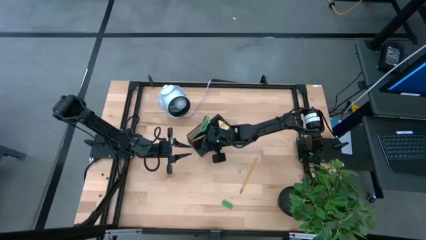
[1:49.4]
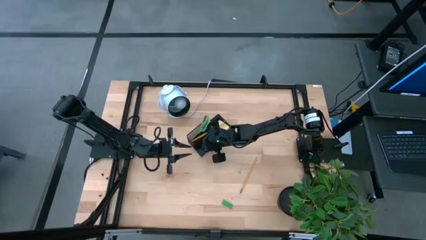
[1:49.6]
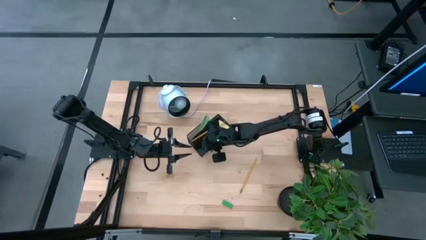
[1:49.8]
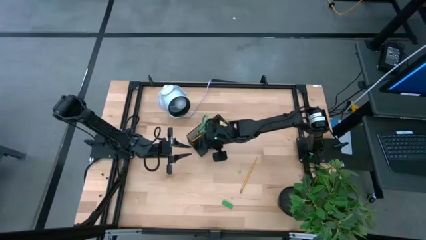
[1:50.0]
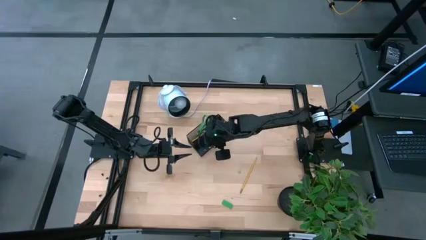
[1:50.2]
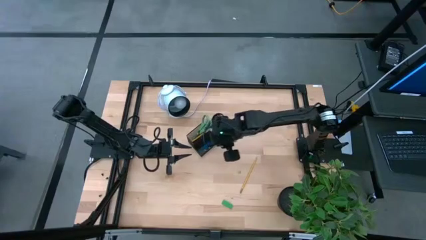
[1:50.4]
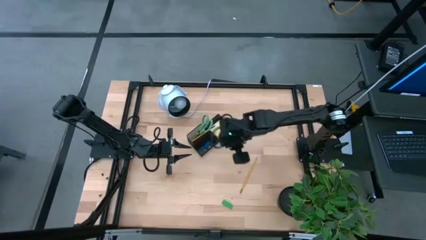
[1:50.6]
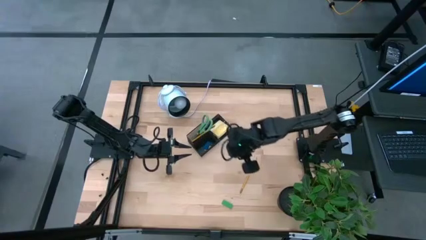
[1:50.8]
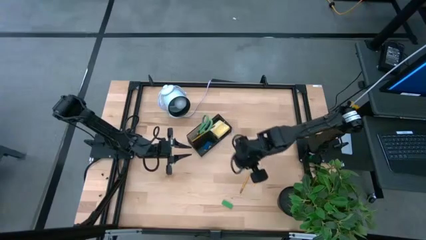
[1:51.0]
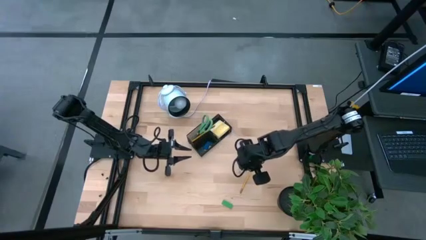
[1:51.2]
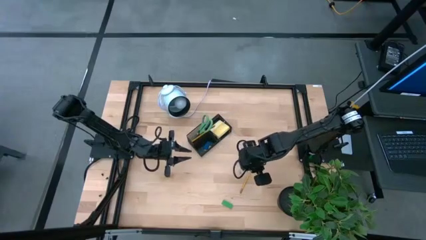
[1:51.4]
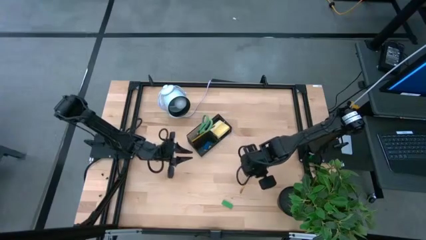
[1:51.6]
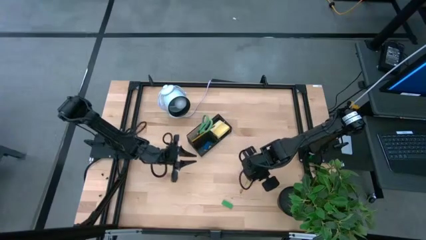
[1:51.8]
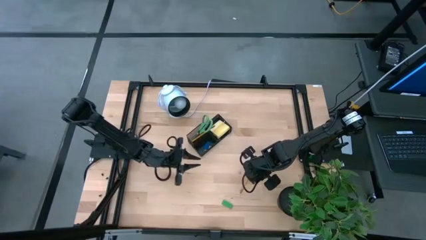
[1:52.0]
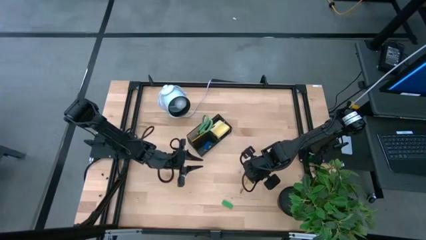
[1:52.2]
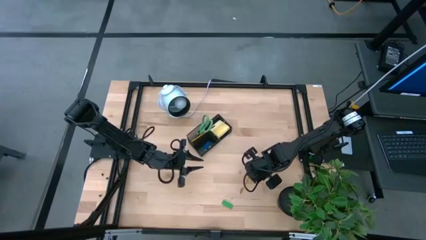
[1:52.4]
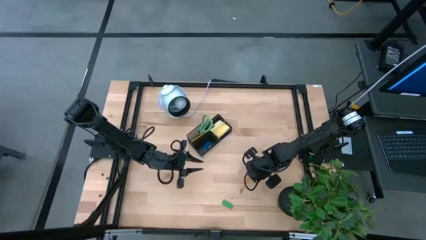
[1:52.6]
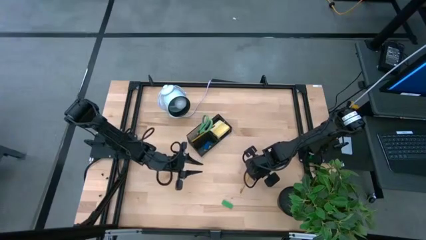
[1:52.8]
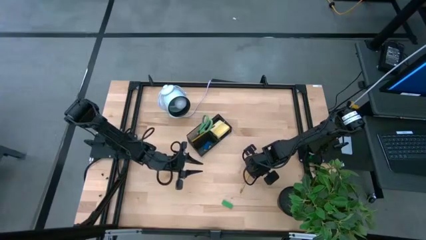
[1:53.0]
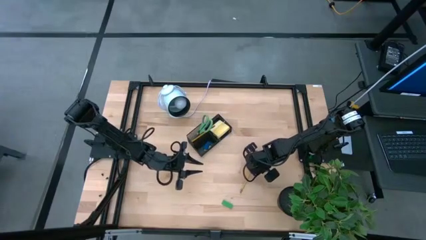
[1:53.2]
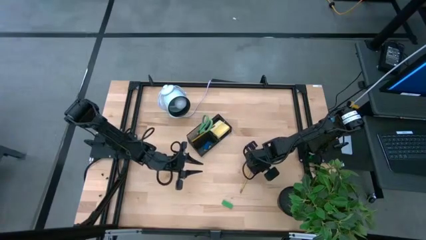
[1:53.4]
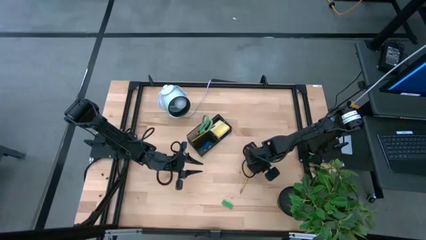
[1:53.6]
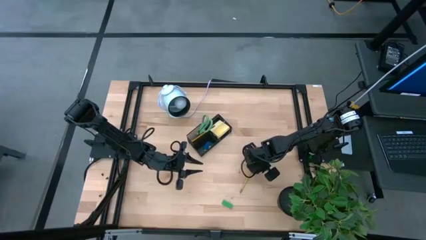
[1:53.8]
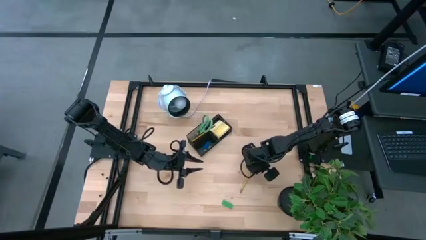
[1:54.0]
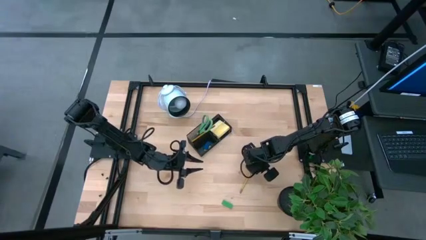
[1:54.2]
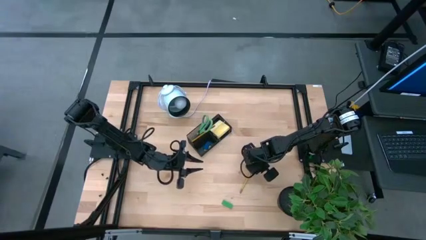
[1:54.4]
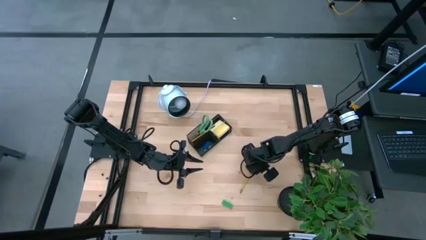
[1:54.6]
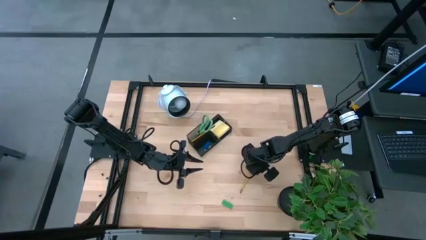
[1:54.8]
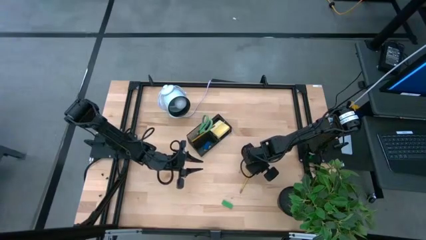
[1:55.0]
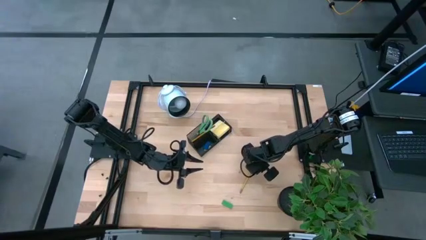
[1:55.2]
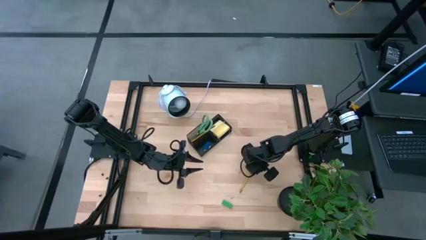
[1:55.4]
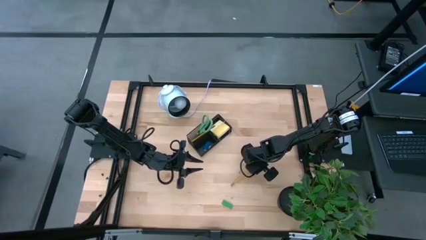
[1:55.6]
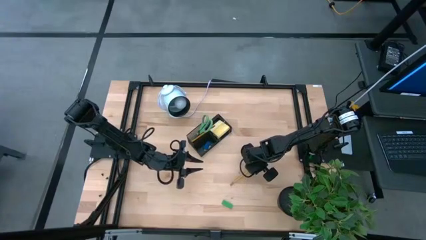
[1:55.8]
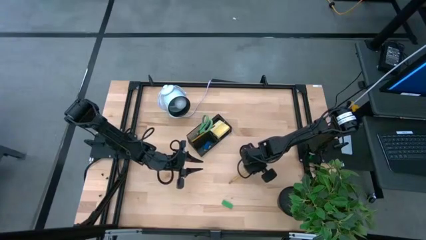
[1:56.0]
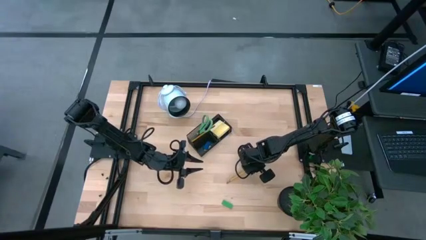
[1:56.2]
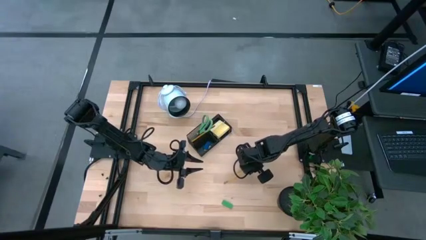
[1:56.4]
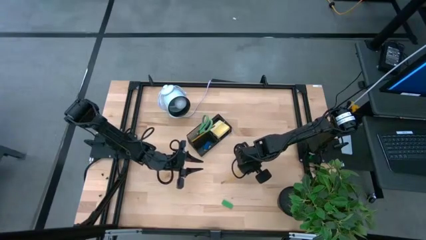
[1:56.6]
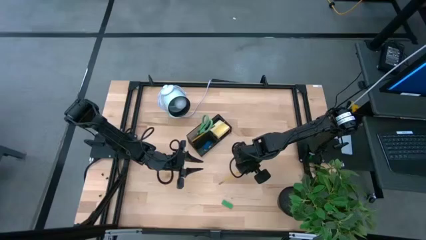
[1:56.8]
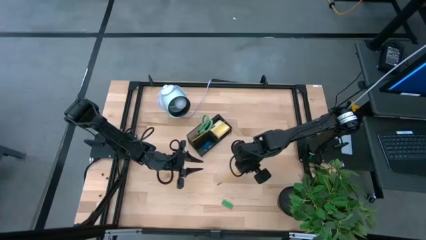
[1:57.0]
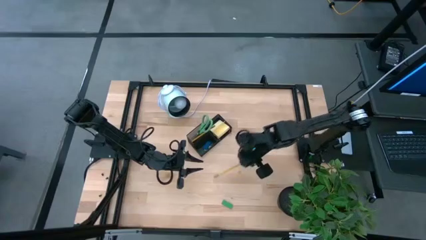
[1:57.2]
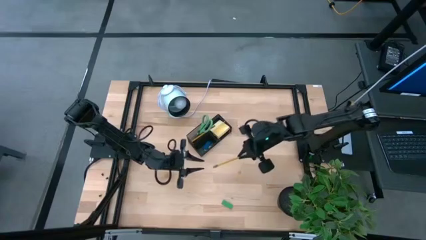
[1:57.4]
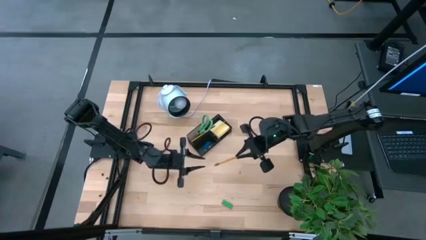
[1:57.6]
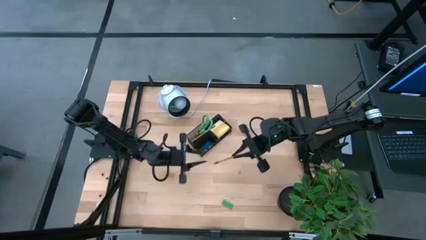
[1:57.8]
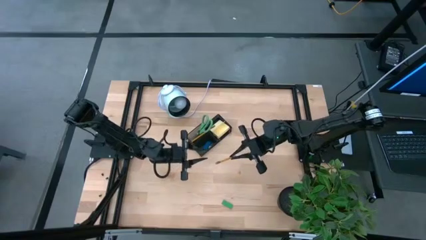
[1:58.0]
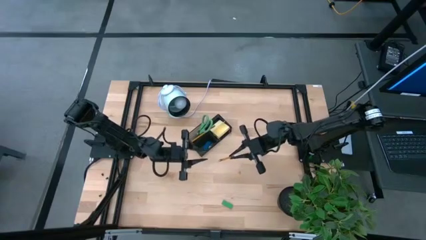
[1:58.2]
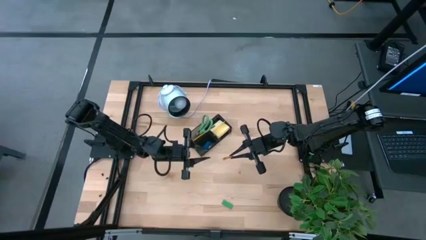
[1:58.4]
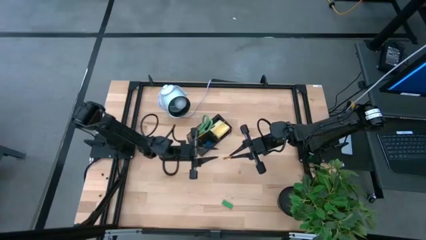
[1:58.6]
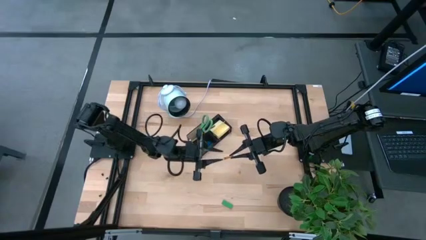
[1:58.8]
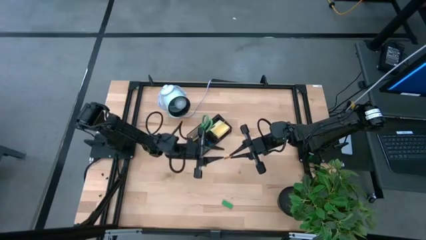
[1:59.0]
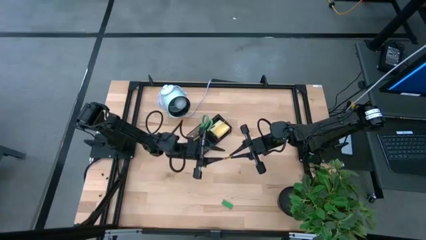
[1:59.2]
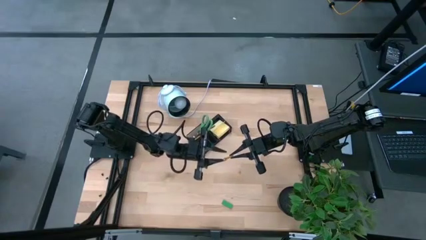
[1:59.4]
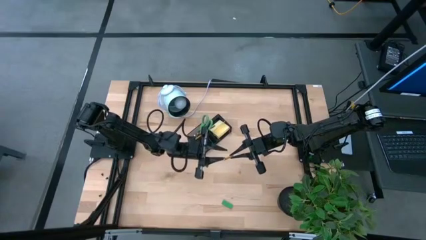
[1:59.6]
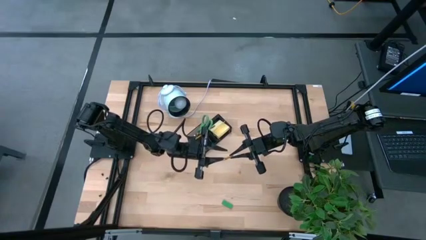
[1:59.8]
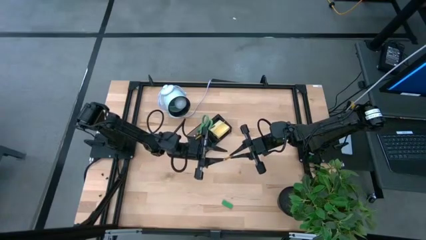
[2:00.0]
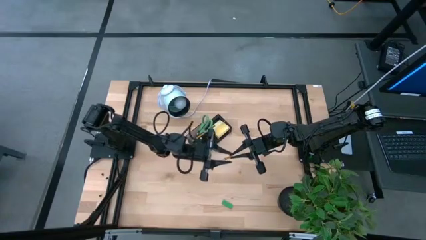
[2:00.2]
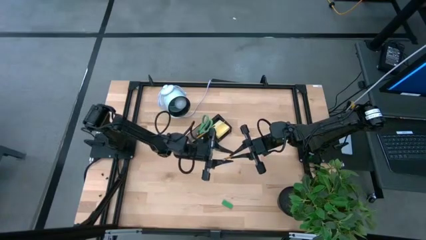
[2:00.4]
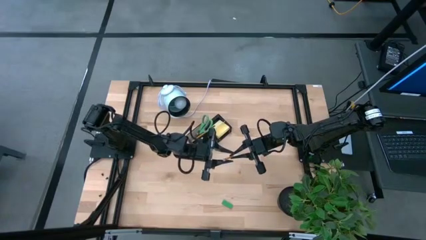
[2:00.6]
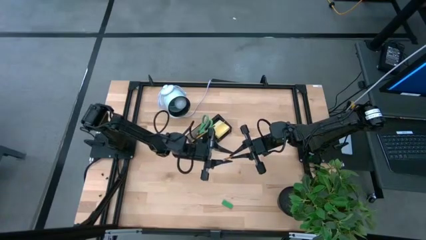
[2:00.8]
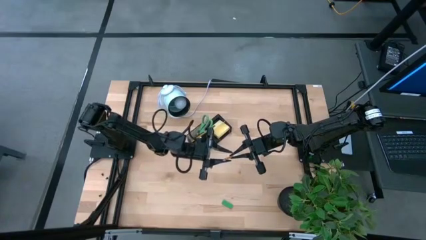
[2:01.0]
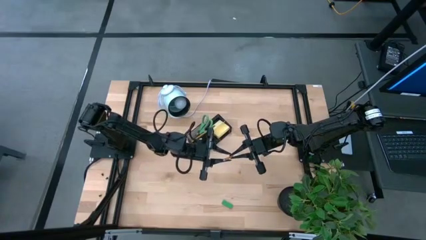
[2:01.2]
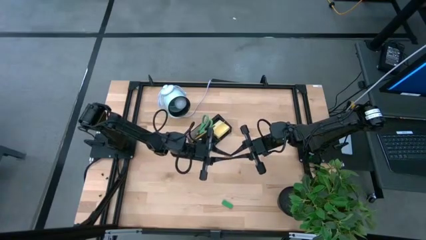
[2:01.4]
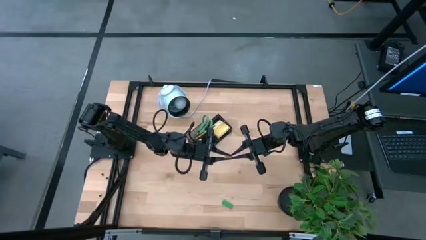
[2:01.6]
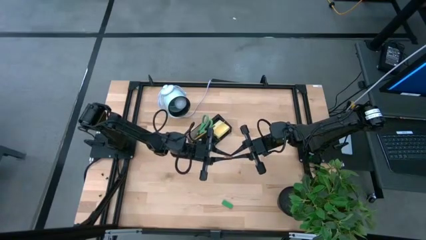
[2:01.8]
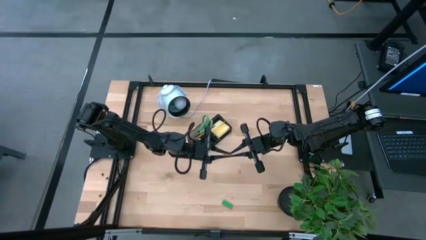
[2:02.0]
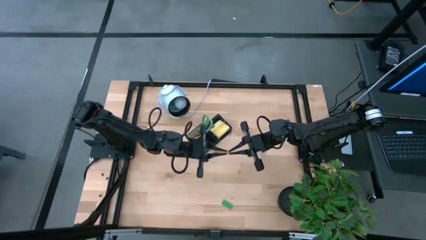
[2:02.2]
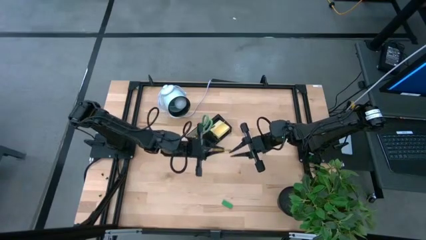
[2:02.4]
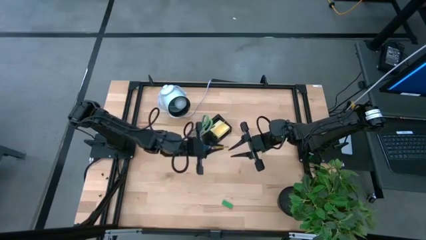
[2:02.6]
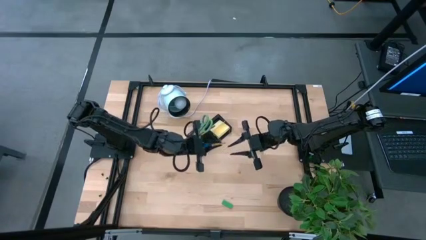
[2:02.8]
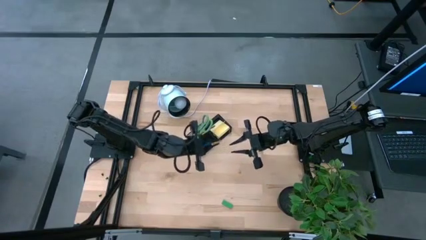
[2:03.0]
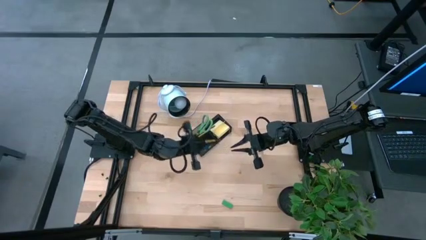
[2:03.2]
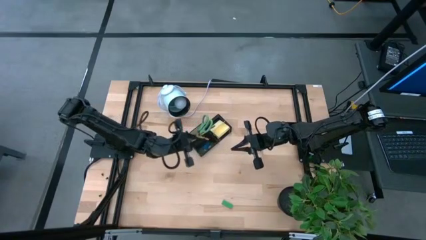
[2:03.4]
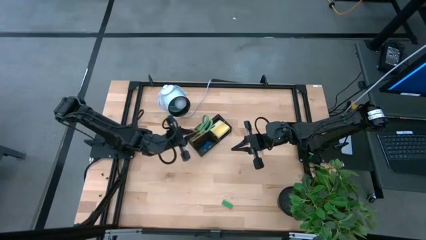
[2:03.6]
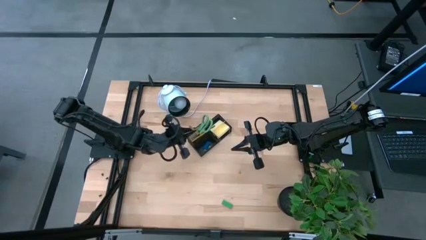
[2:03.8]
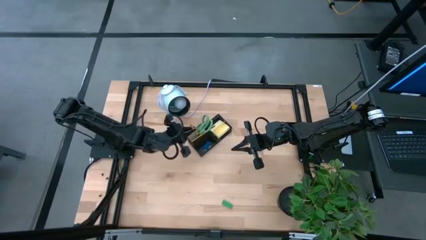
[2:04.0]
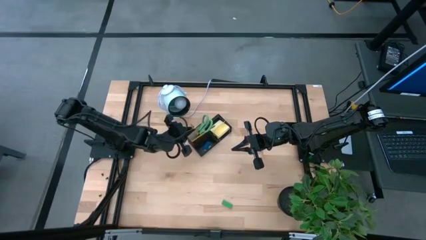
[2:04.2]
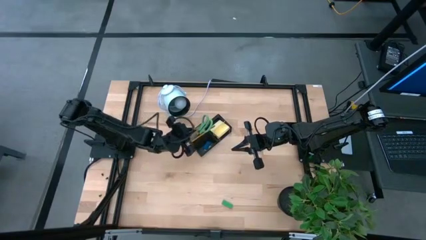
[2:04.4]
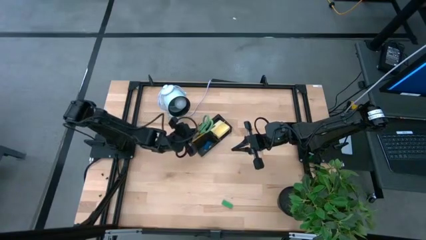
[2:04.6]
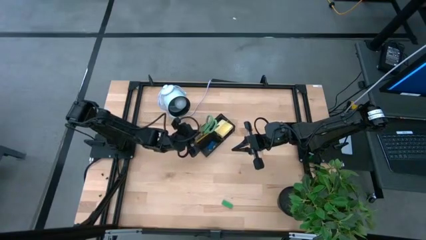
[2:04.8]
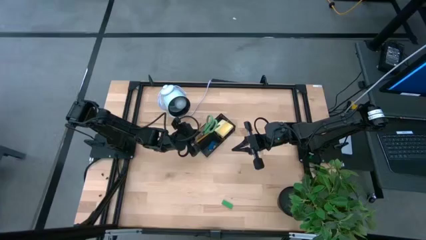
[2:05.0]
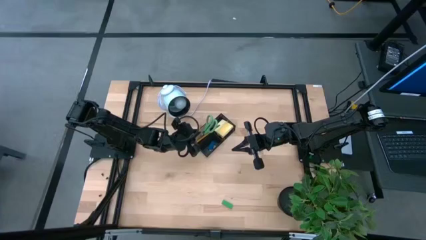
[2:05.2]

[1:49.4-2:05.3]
Task: Pick and place office supplies into organizer
Put the yellow pencil into the black desk organizer
